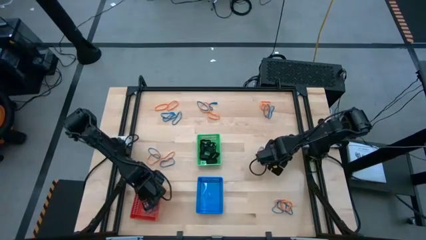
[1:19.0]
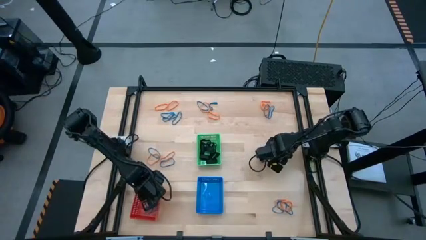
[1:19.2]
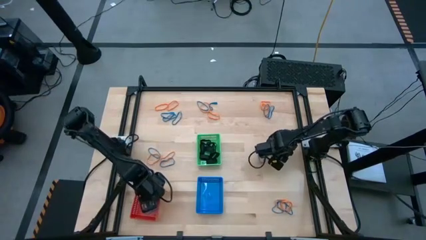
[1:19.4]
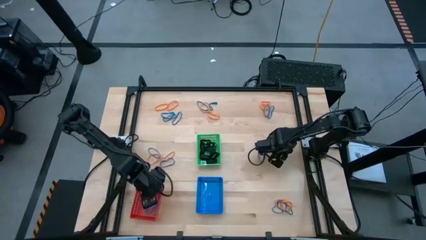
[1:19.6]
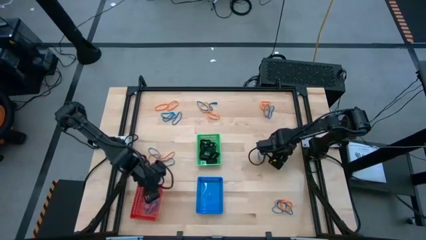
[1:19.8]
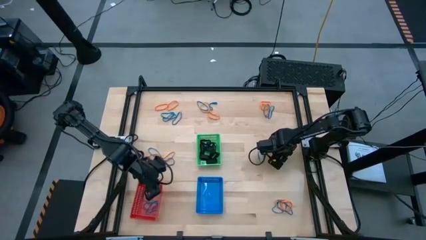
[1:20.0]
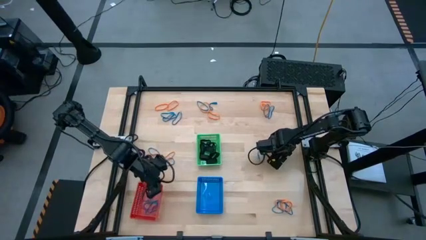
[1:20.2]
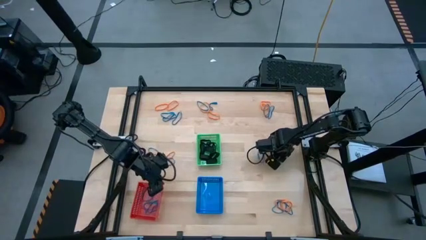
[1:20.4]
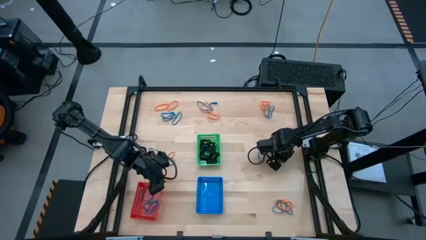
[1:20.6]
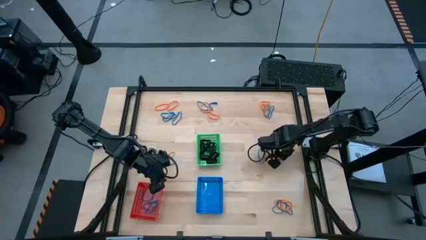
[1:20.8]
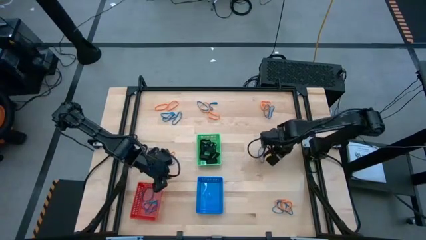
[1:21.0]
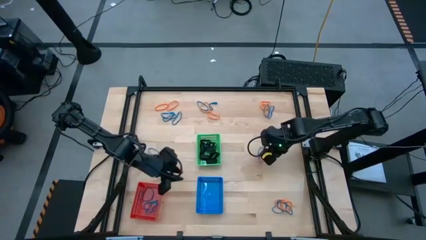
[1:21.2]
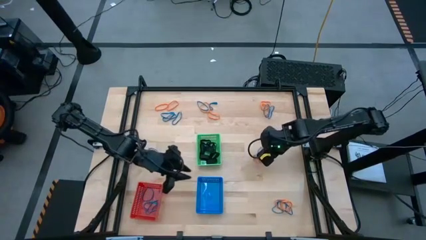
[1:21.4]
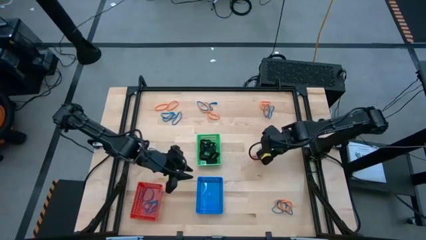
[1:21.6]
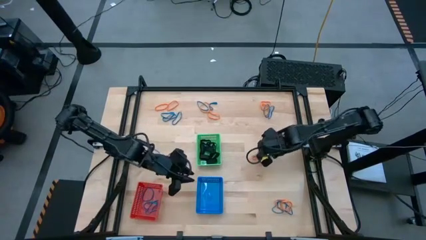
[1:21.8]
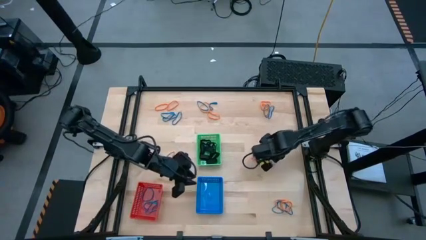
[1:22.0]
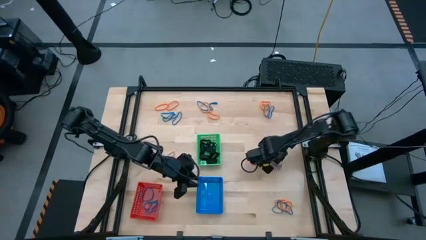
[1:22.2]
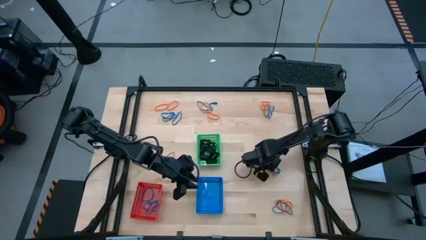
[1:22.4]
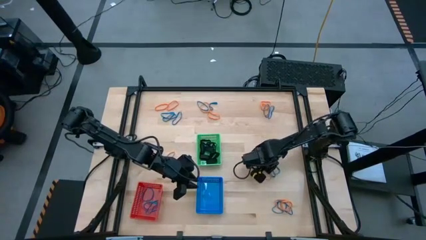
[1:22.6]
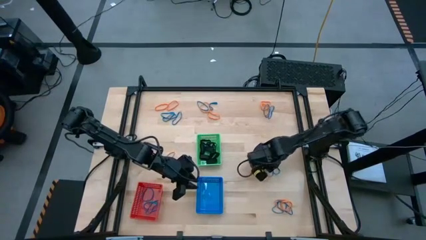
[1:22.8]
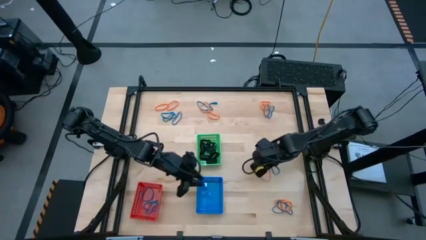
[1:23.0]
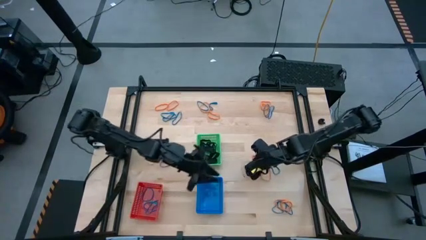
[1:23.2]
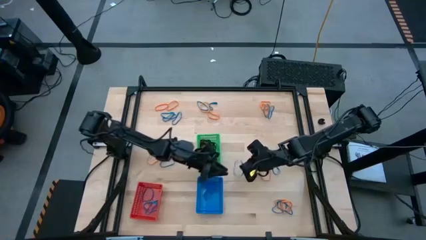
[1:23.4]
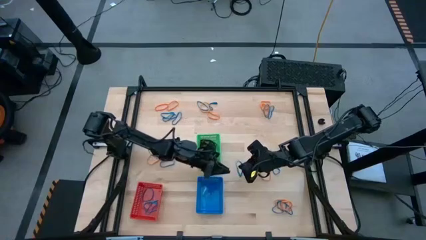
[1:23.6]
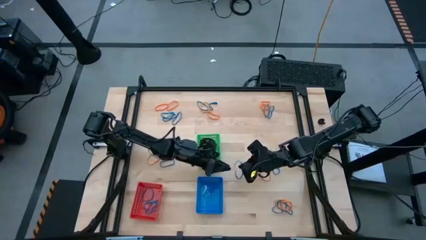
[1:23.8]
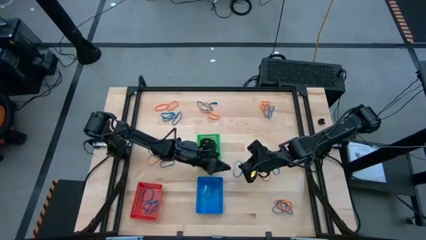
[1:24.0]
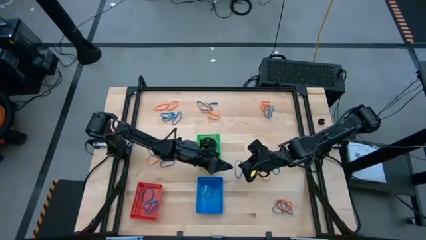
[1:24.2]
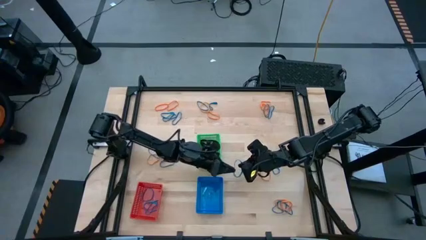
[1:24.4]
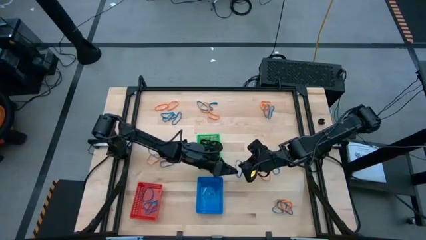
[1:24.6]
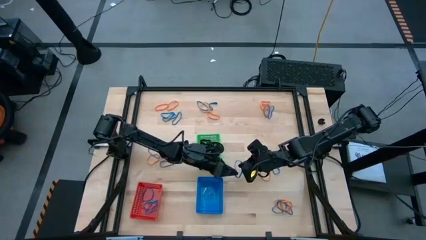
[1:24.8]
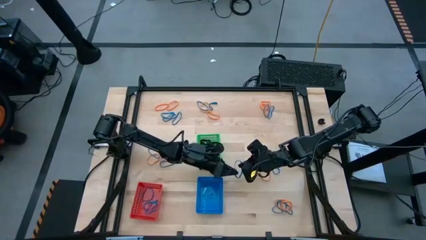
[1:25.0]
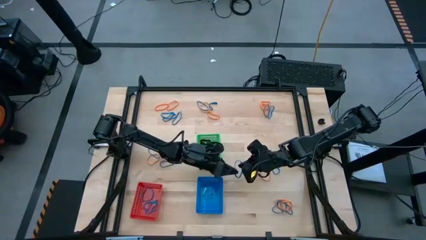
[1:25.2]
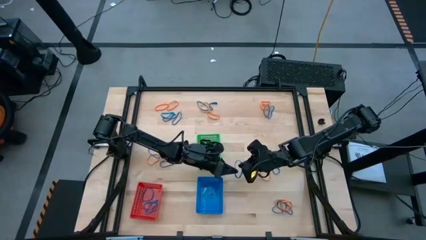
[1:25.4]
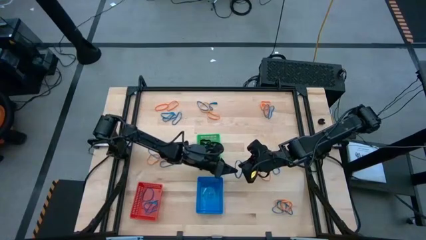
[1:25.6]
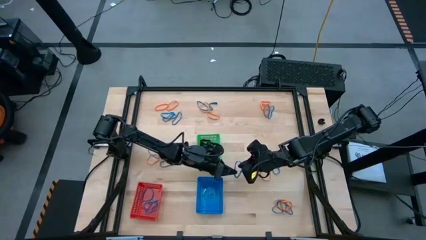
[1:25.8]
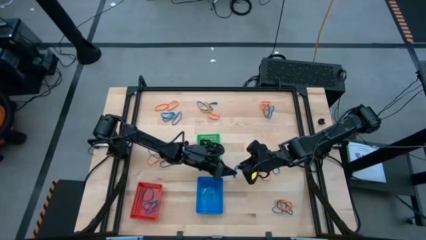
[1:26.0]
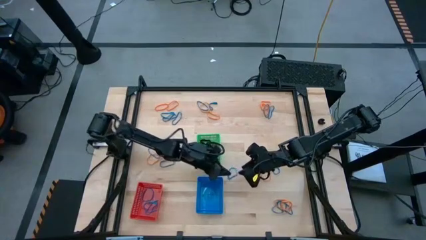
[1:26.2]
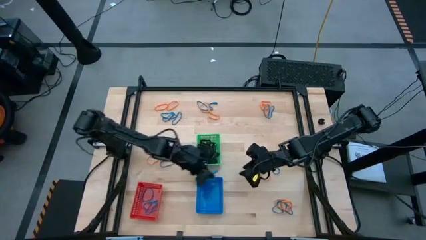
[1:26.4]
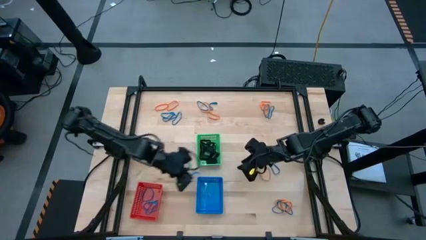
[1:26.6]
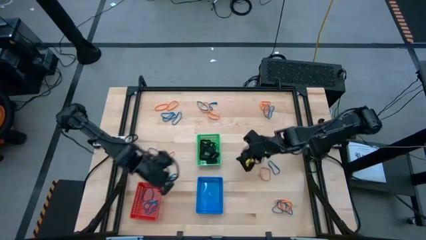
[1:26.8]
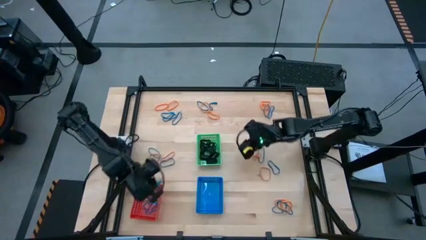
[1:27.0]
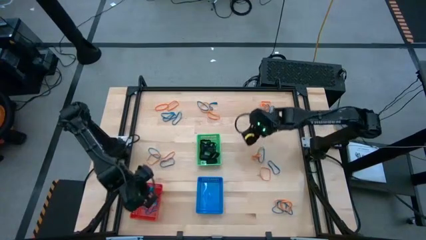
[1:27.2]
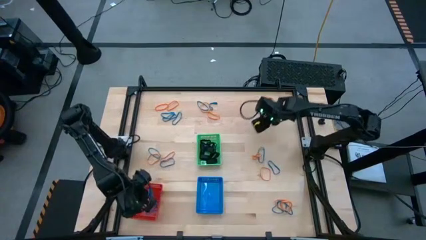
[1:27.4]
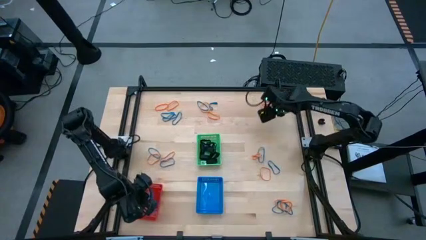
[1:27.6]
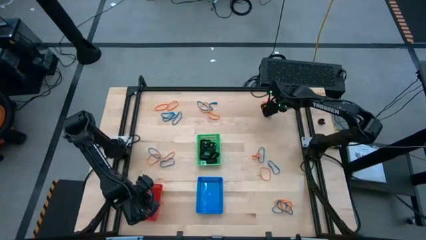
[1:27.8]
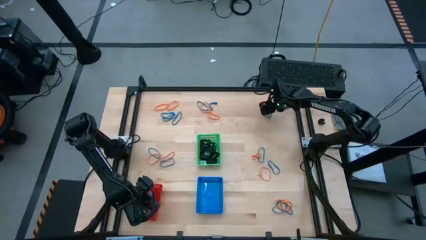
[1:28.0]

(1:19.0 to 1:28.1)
Task: Sort rubber bands into baskets
Put the blue rubberband into the red bin

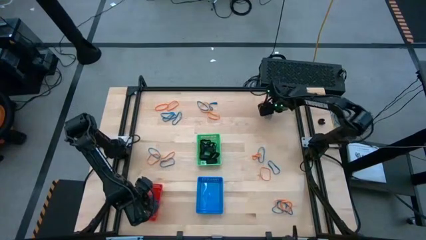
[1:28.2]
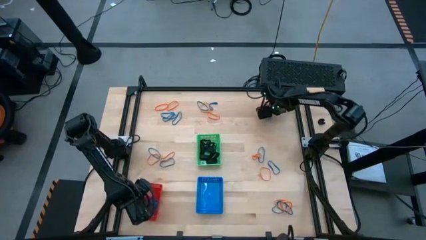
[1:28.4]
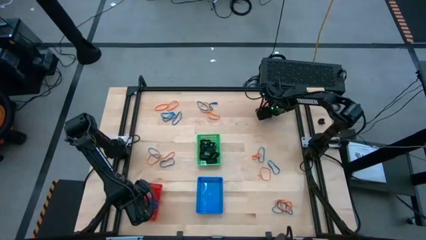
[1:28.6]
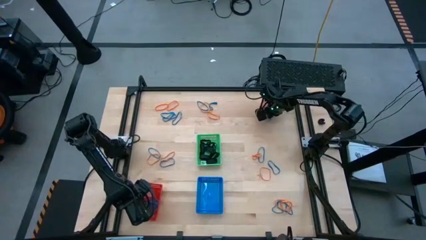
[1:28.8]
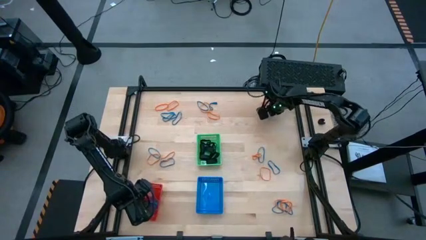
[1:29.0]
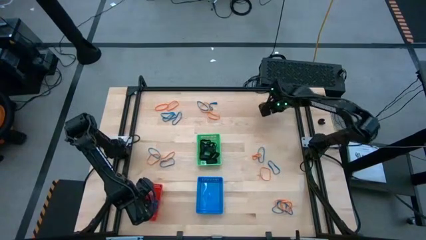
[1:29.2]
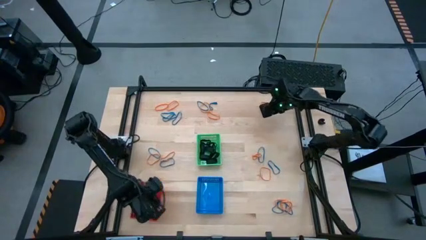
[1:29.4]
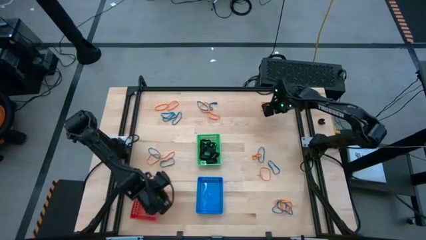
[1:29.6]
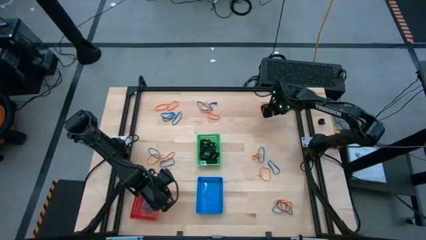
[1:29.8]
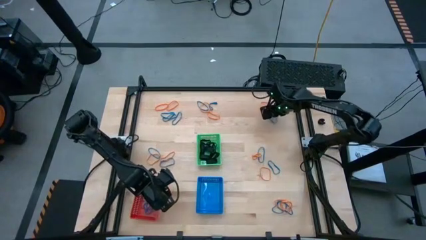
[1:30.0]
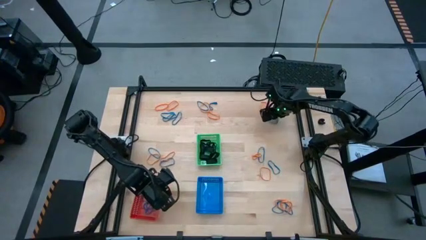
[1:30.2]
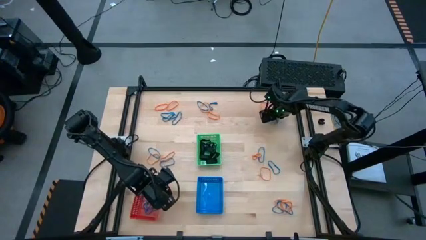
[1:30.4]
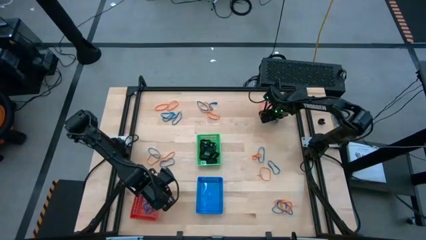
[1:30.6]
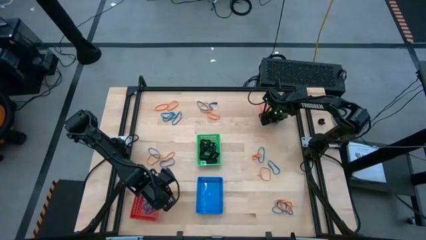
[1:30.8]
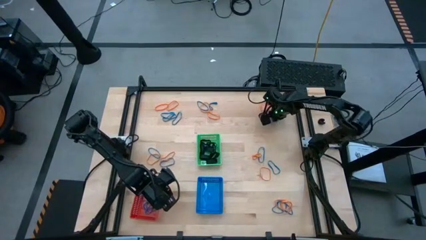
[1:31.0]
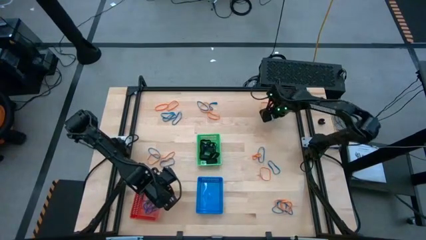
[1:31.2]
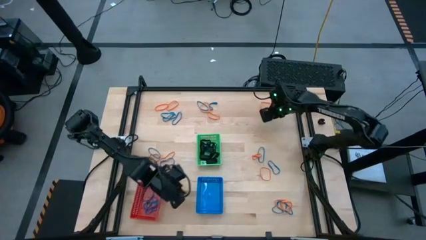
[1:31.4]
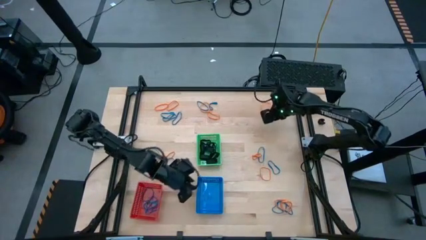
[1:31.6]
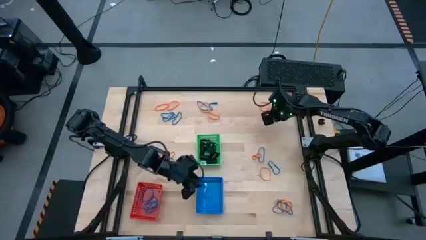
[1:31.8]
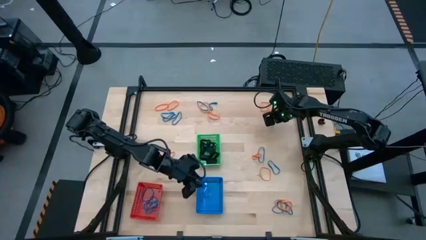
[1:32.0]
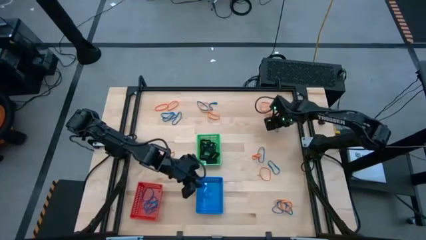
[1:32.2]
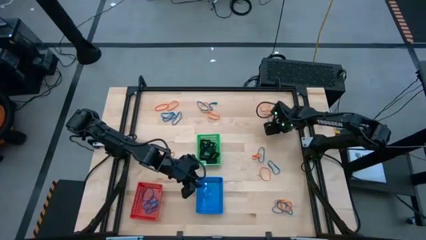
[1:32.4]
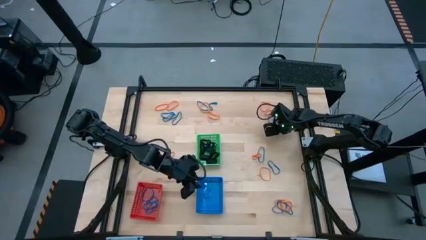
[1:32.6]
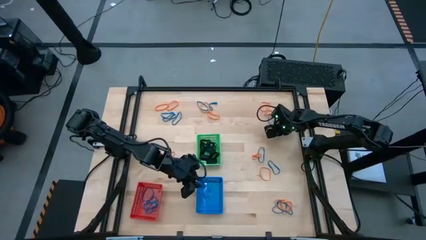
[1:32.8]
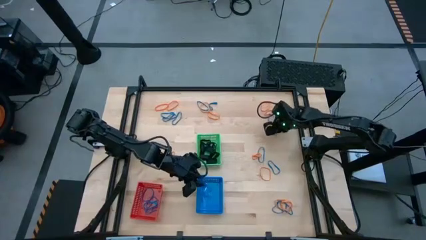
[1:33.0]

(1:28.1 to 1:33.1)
Put the blue rubberband into the red bin

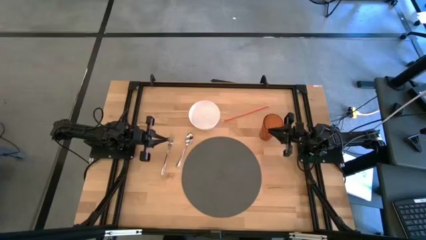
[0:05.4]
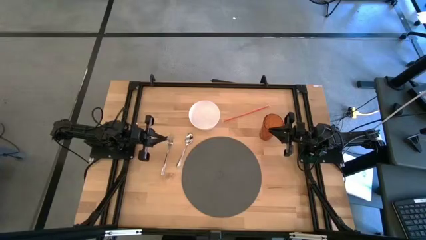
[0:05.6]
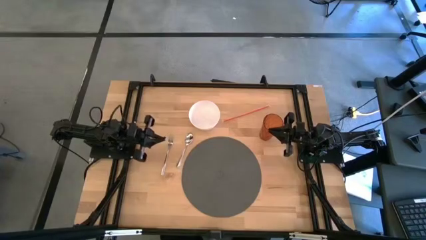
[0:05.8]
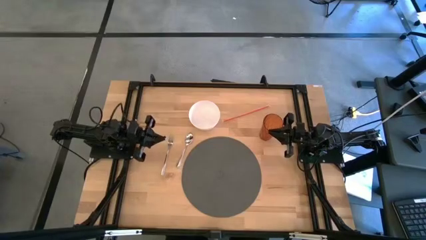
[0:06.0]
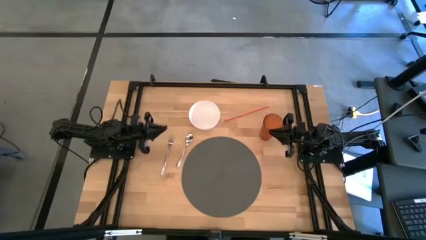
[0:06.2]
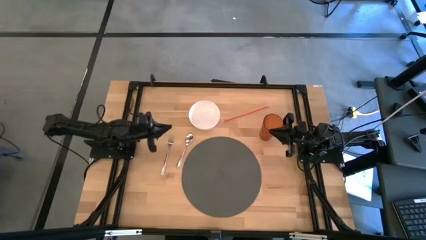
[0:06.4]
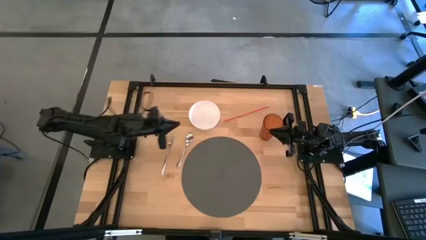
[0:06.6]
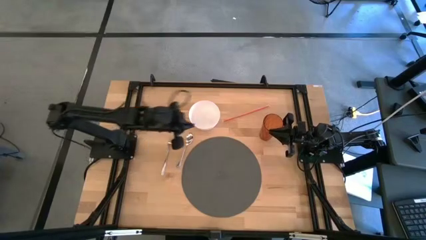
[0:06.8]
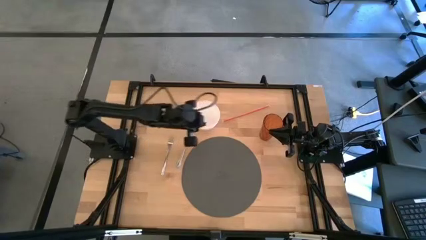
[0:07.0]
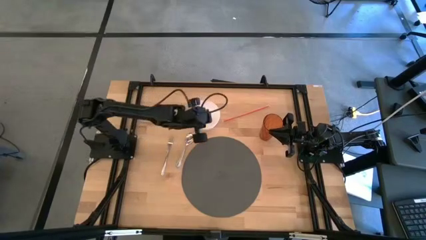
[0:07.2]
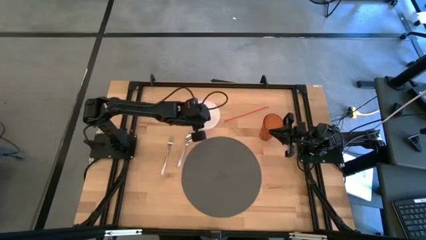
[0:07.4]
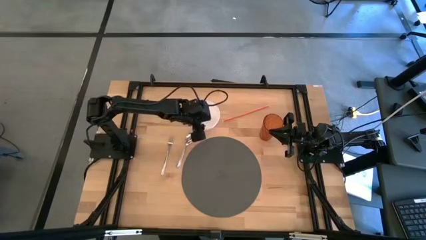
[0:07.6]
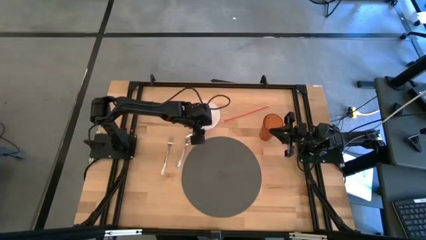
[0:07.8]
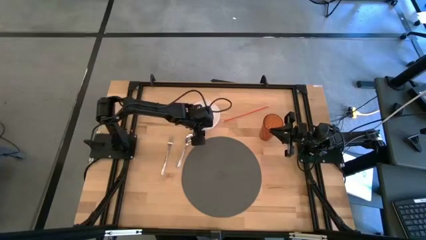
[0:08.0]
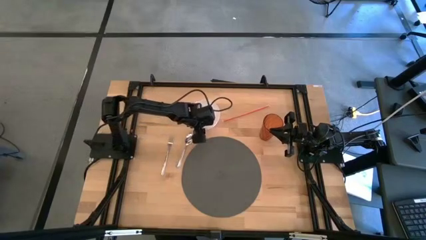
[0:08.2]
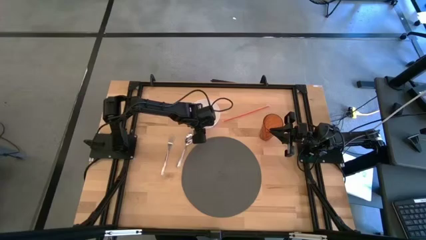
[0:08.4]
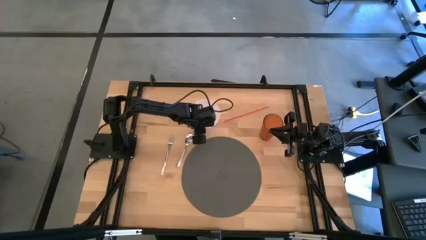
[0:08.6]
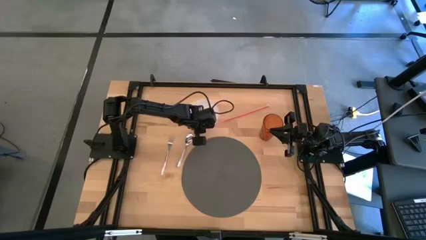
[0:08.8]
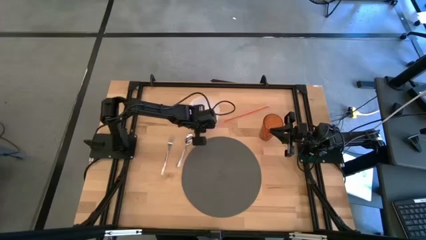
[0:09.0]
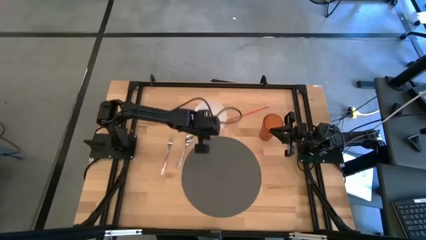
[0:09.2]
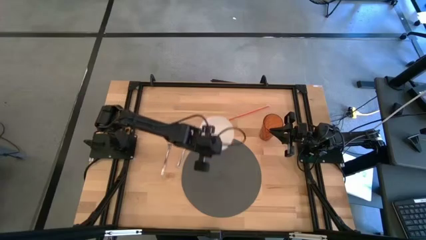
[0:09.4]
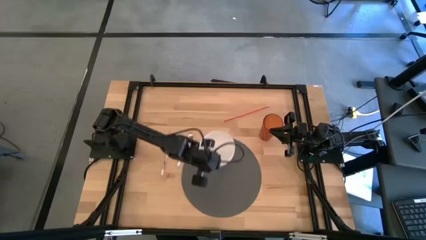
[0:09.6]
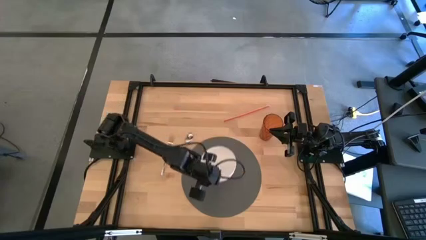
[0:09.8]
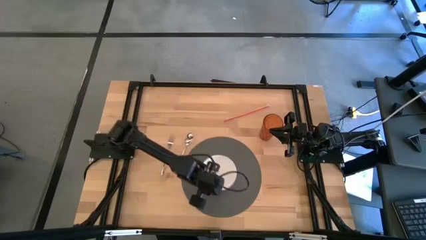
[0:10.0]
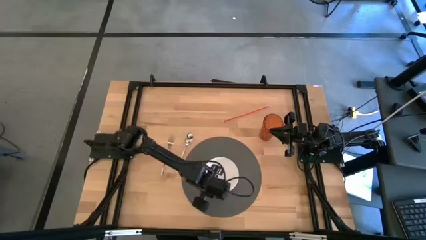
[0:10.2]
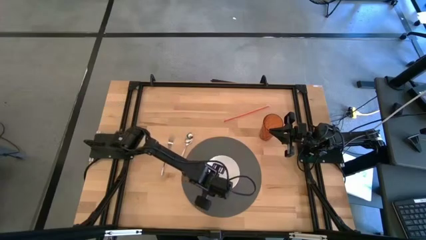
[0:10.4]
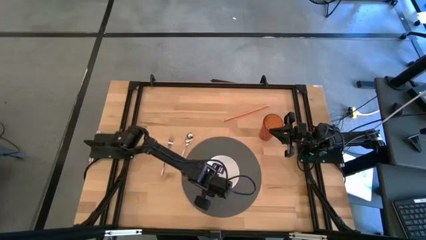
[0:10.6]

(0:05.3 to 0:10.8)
Task: Pick & Place Utensil
Put the white bowl on the gray mat
